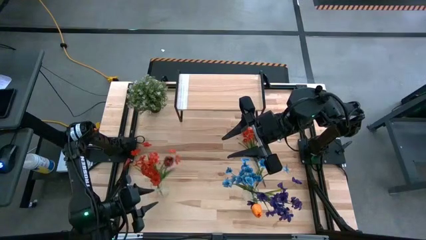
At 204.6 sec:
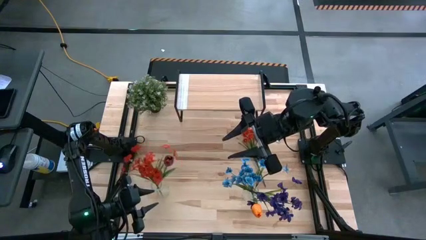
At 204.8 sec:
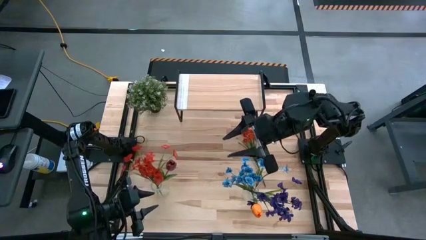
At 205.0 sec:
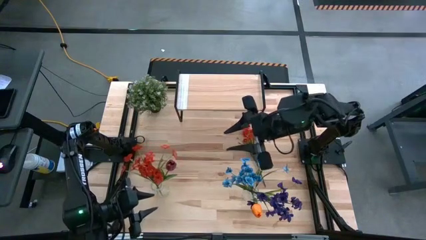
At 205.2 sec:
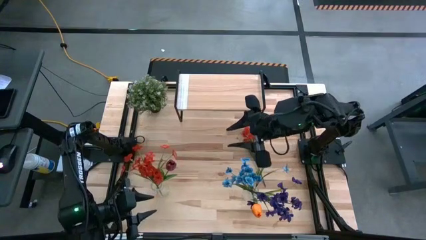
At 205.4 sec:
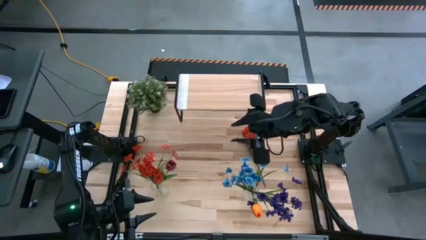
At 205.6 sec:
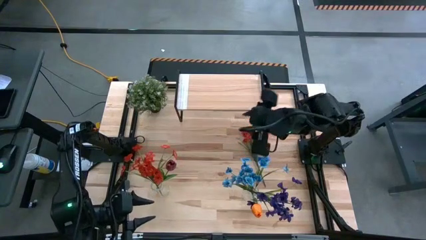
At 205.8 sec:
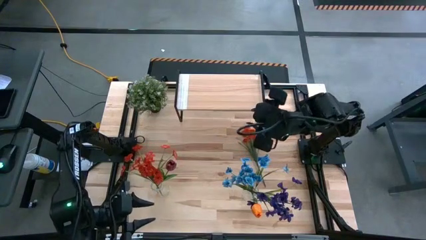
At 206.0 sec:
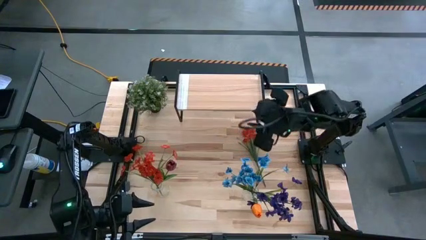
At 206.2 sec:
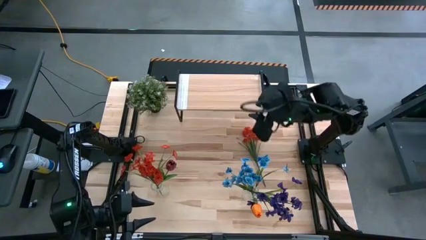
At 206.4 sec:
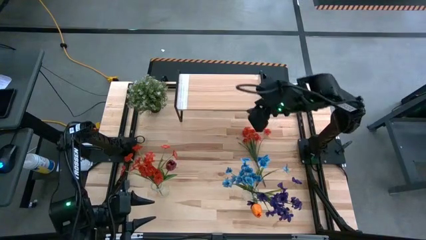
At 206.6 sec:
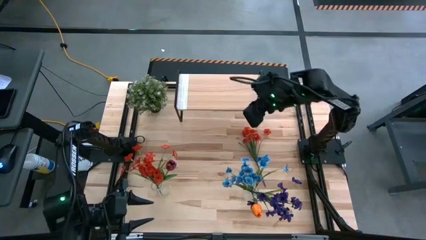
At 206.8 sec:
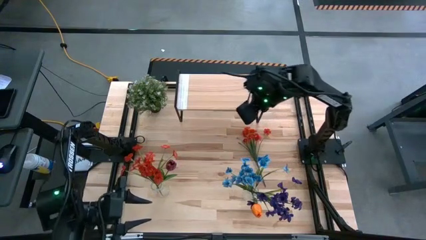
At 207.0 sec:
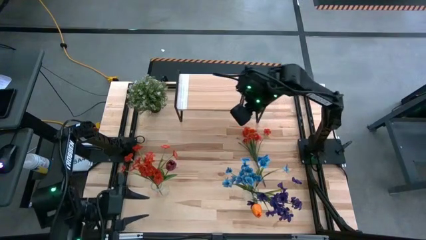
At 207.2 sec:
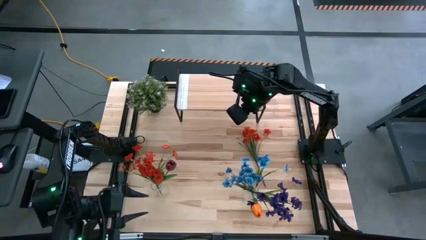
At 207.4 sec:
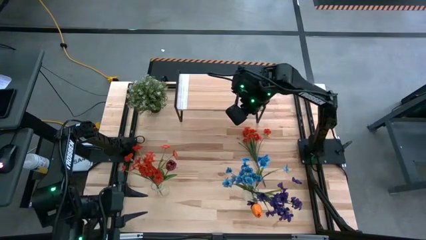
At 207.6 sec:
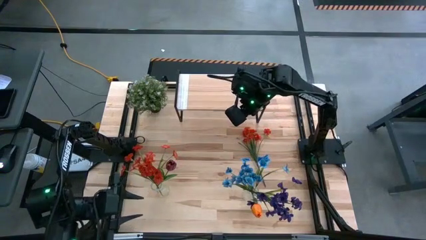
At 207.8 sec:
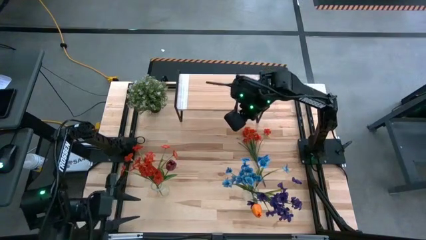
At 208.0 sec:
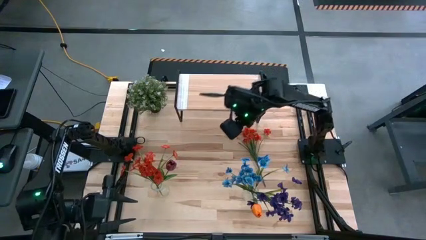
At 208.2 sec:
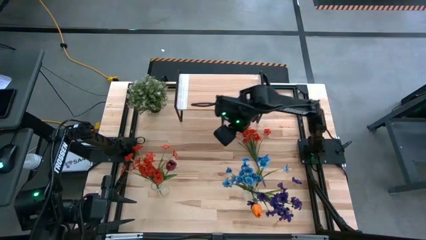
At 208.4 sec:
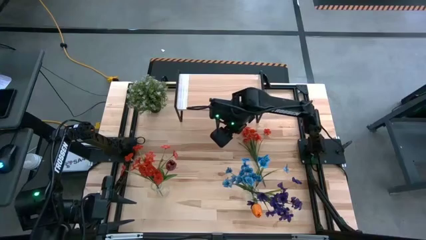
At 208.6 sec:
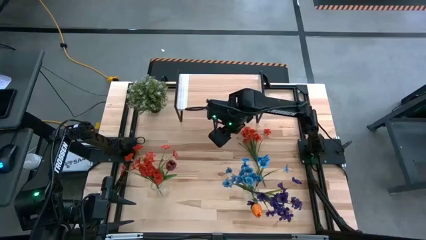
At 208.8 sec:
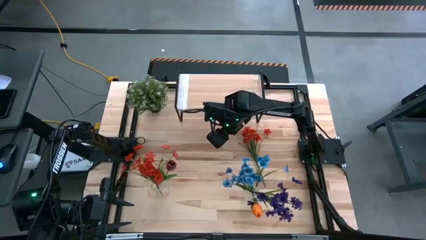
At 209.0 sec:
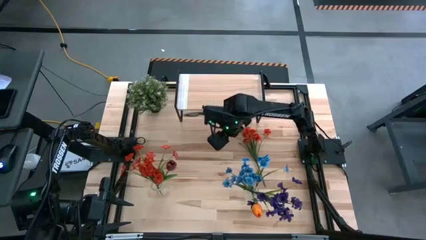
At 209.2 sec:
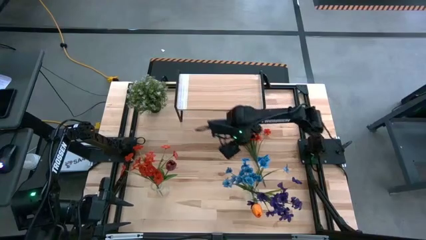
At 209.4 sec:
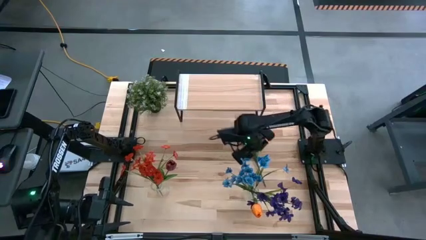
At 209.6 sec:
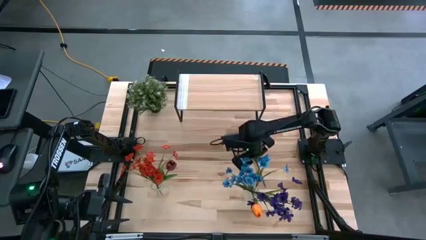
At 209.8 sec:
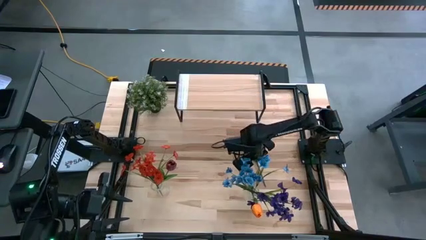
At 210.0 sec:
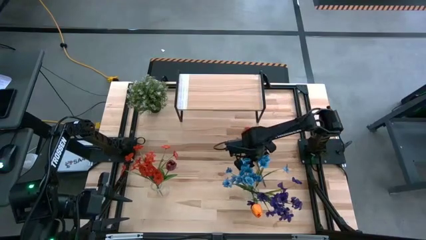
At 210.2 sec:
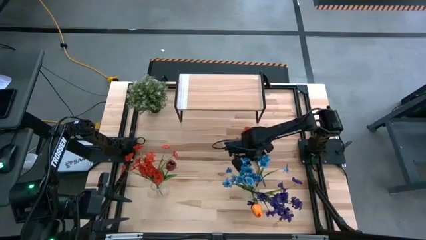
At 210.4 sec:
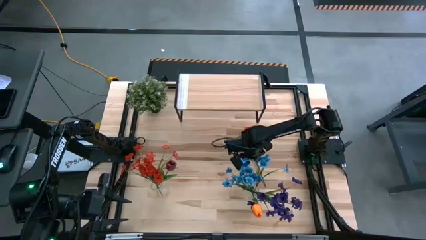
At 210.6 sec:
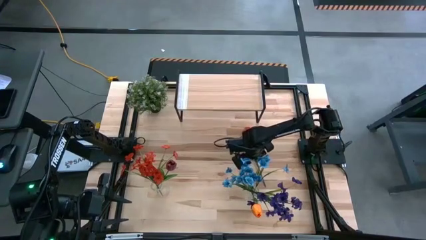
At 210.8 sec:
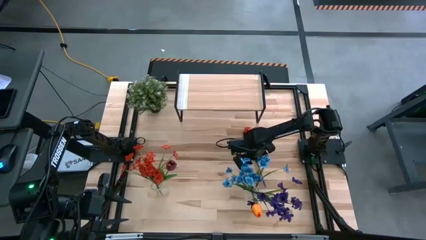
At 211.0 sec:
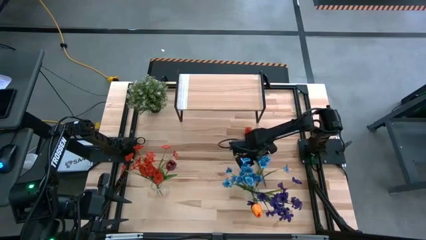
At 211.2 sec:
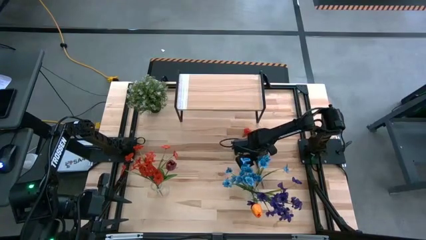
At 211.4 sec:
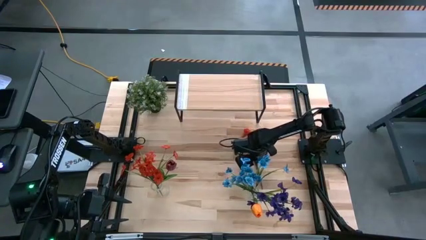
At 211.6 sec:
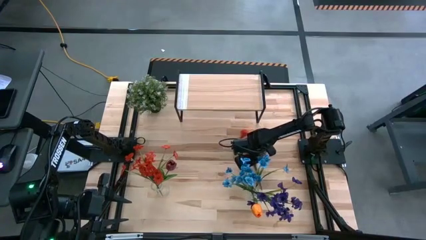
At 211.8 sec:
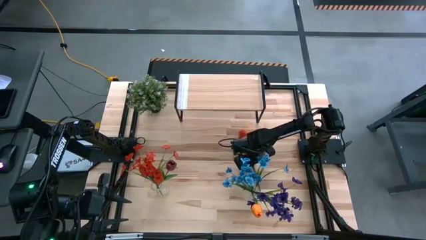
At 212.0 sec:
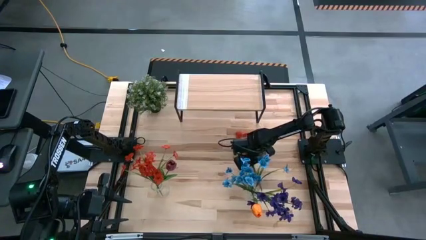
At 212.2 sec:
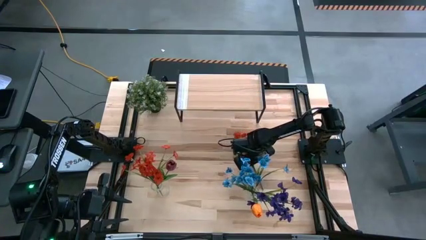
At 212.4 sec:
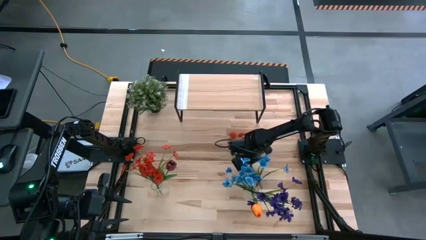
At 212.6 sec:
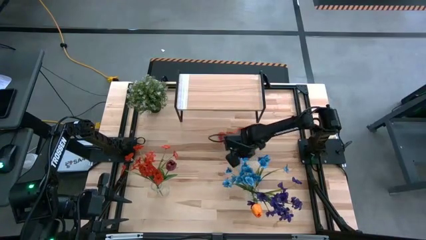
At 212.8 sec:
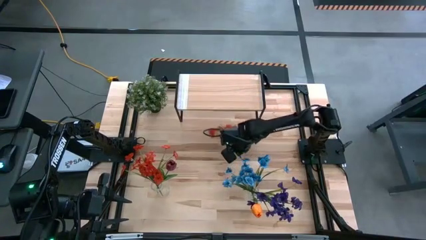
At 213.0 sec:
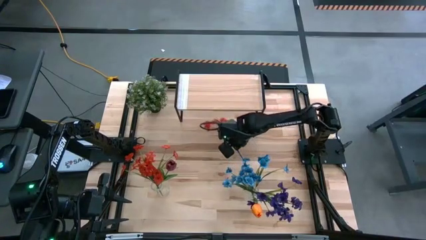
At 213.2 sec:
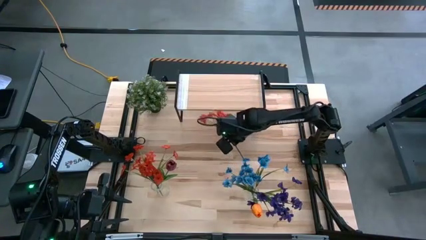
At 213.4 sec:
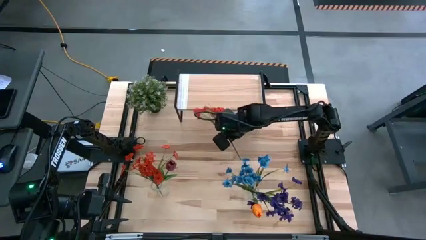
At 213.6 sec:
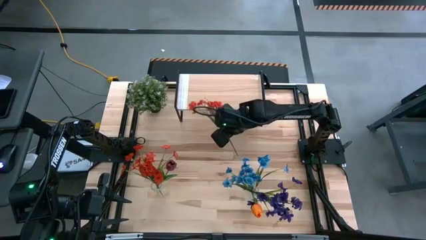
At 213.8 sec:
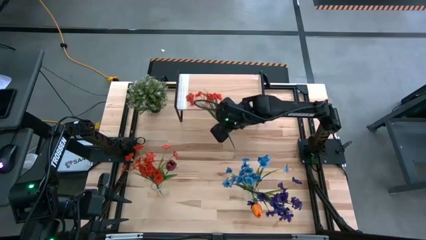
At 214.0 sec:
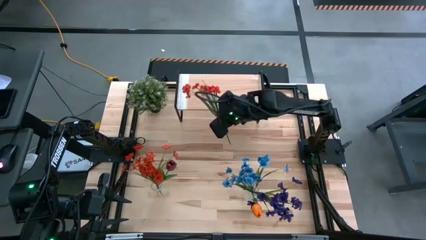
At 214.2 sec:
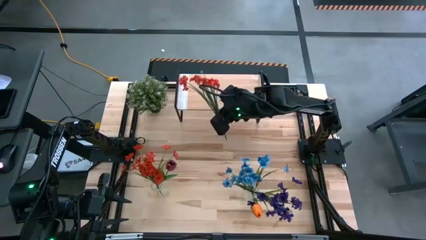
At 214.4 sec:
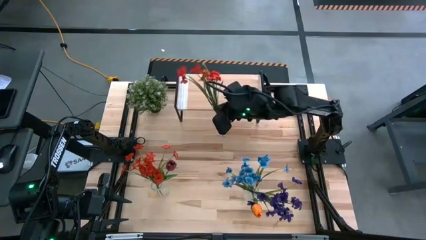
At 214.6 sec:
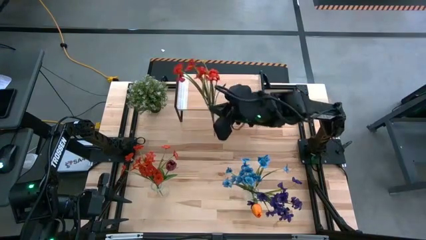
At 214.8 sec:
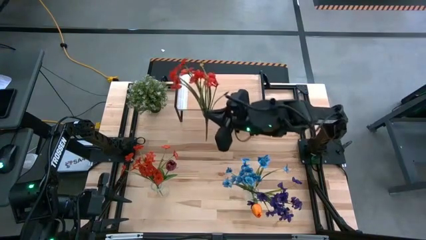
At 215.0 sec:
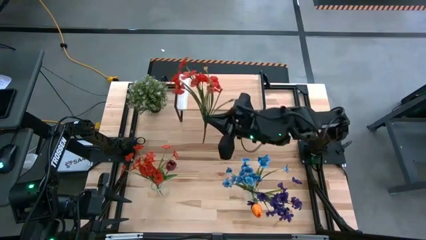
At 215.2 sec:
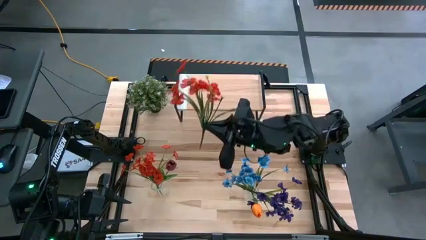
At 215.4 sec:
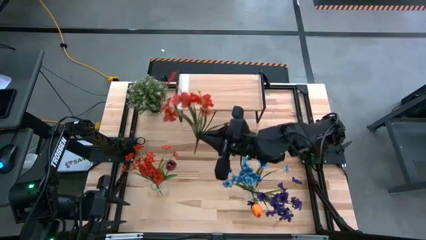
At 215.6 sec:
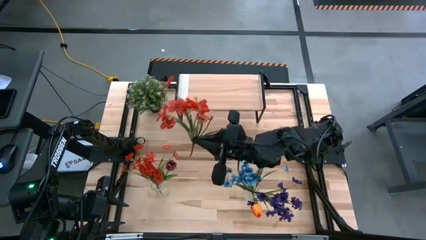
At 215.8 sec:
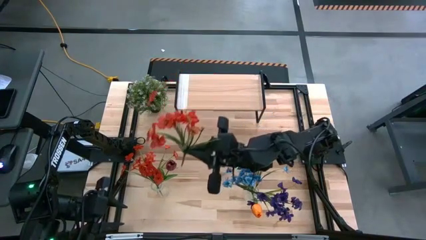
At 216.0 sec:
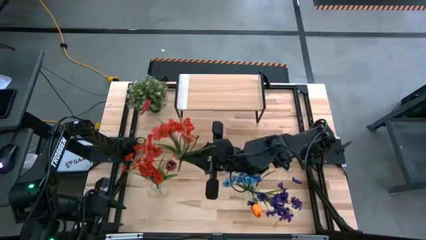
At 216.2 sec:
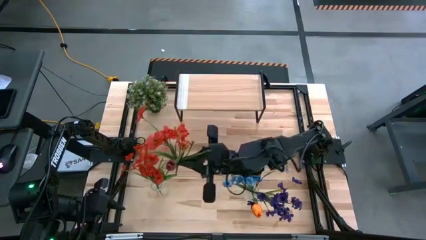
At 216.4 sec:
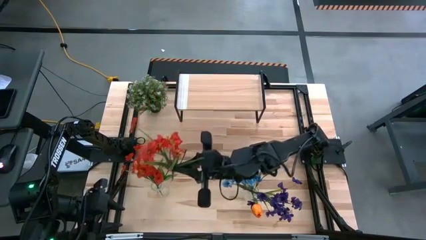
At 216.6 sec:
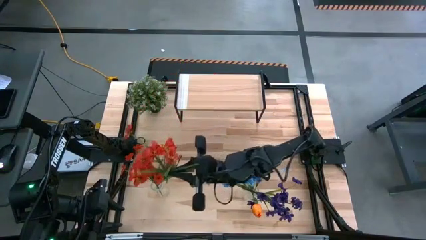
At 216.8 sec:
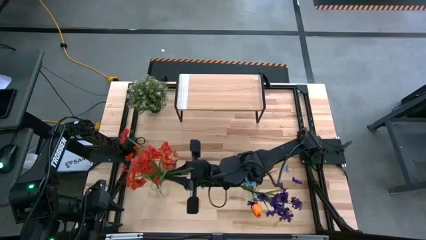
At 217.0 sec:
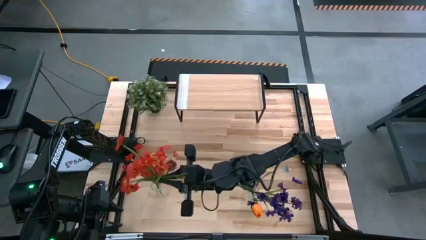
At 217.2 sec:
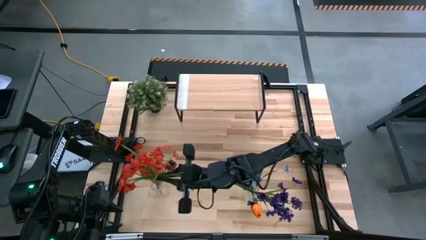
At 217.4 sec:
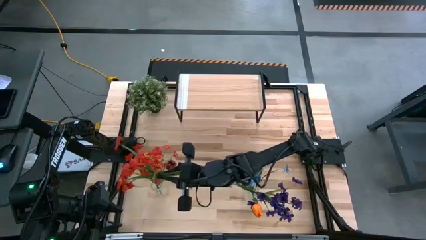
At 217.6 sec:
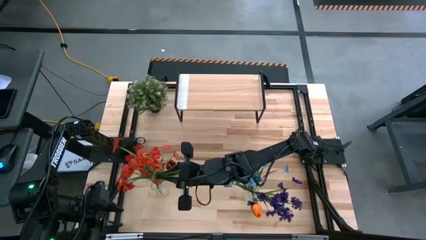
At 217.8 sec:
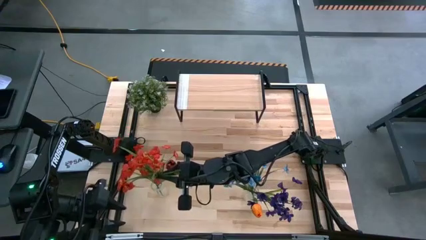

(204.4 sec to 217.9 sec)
Task: Pick and place flowers into a vace then onto a shelf
Put the orange flowers into the left transparent vase
